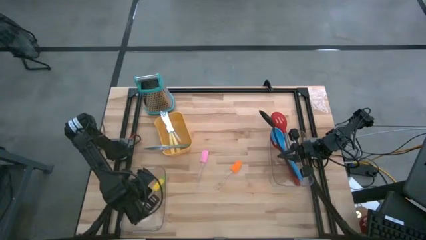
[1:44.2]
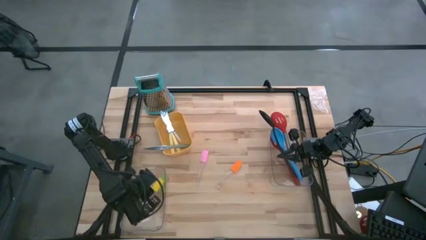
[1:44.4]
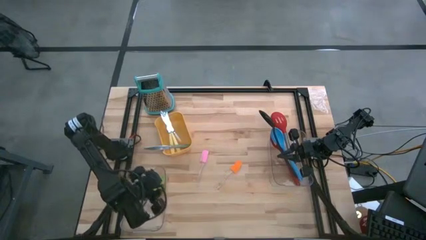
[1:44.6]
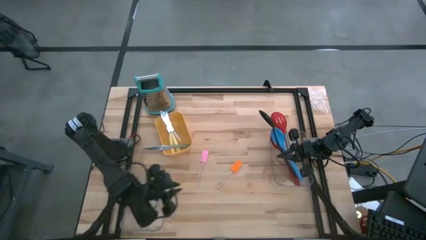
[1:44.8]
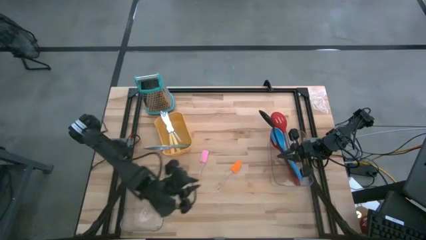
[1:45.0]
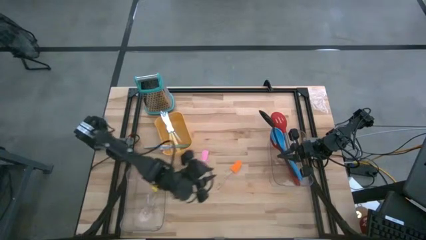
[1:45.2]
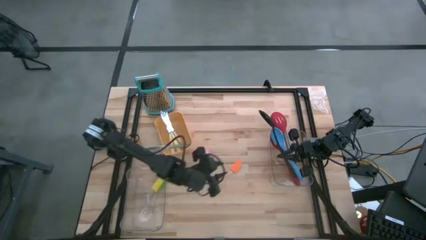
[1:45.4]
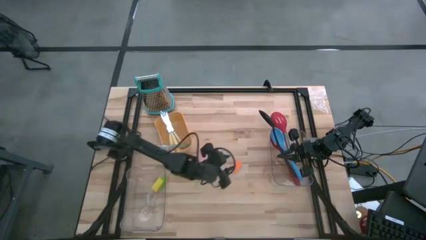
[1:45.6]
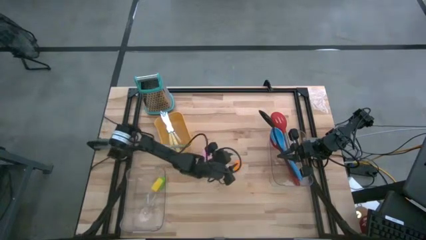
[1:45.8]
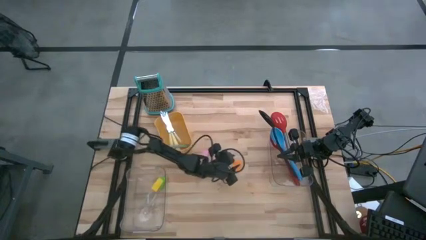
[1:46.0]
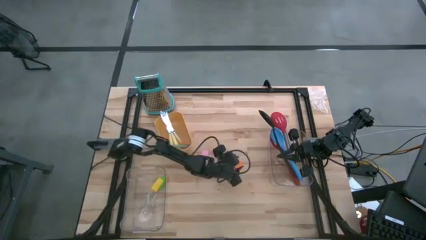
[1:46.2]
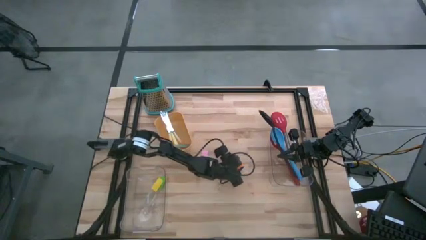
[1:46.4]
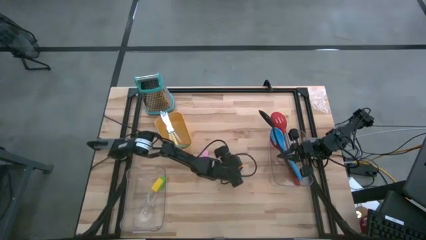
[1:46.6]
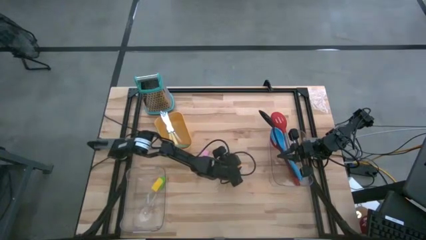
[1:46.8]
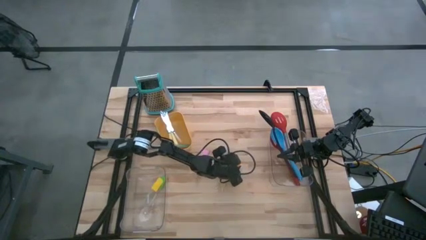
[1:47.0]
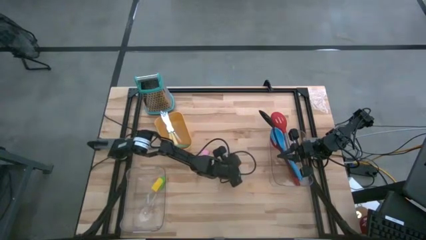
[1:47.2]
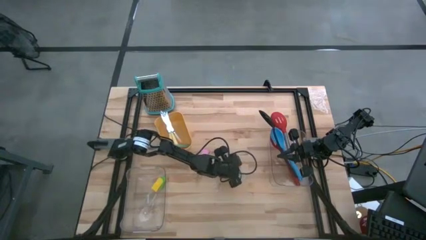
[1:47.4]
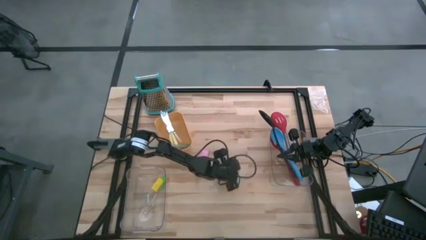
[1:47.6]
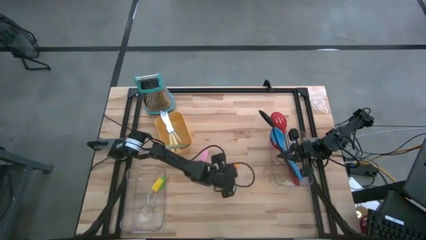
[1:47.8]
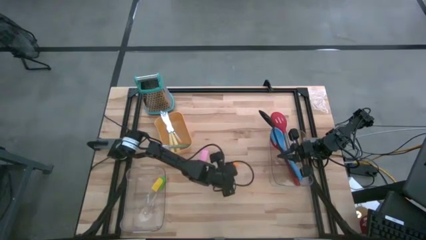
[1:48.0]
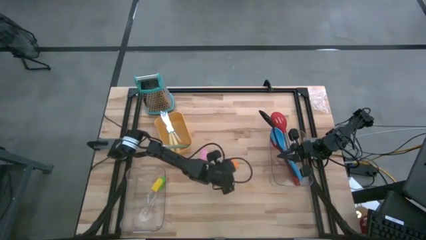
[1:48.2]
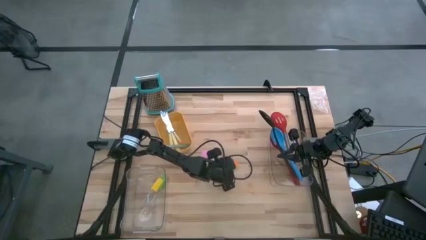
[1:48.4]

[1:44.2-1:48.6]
Task: Pick & Place Kitchen Items
Put the orange spatula into the left transparent bin

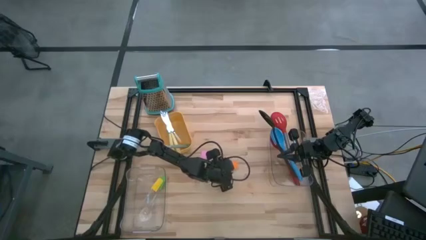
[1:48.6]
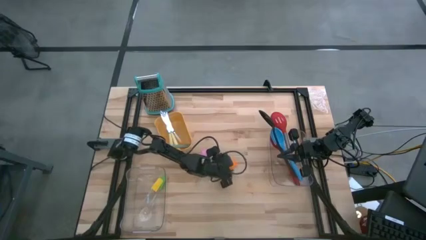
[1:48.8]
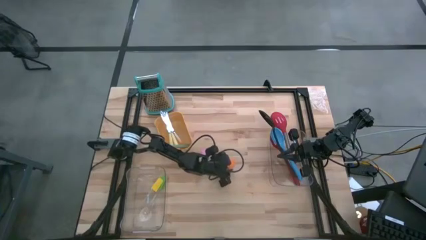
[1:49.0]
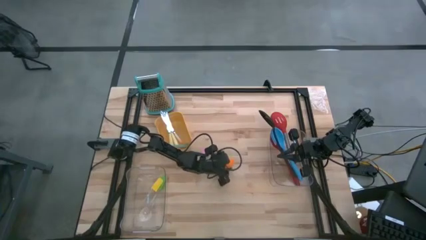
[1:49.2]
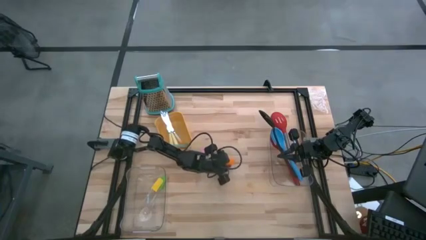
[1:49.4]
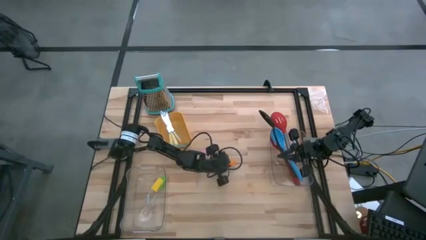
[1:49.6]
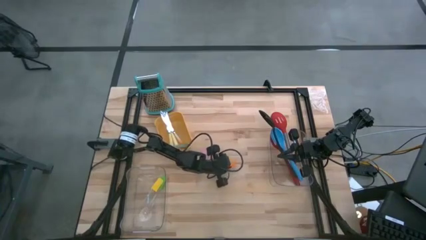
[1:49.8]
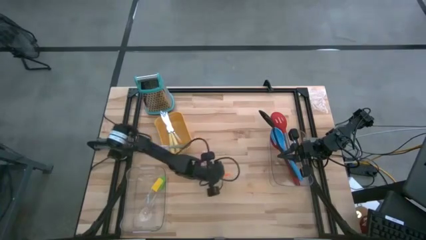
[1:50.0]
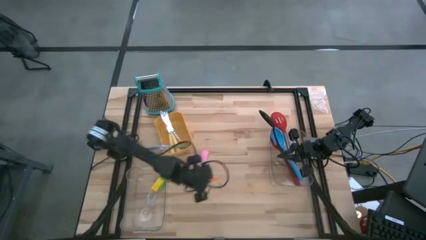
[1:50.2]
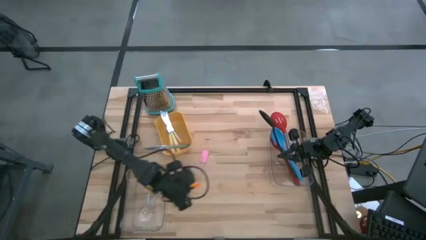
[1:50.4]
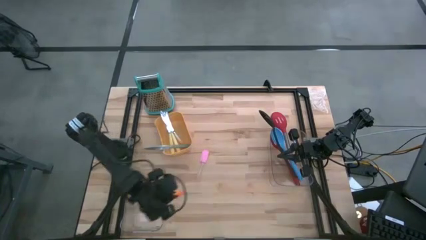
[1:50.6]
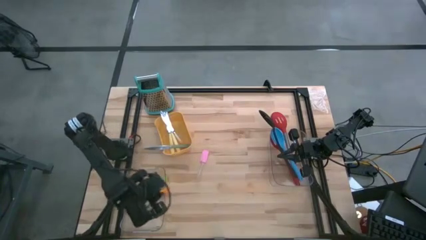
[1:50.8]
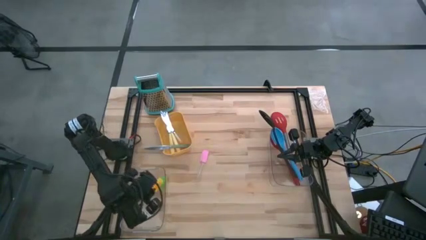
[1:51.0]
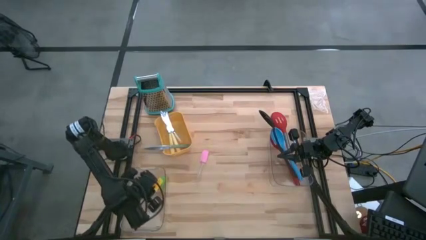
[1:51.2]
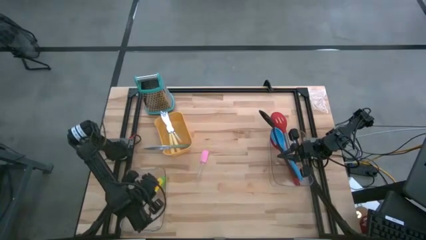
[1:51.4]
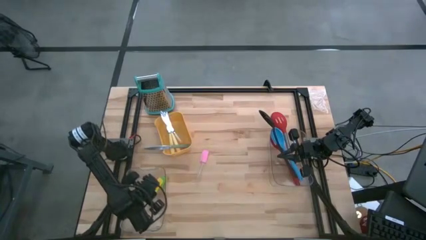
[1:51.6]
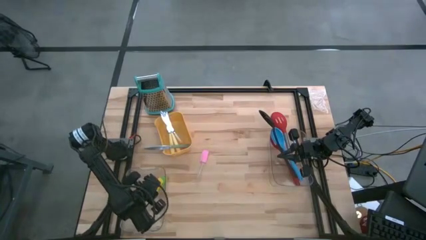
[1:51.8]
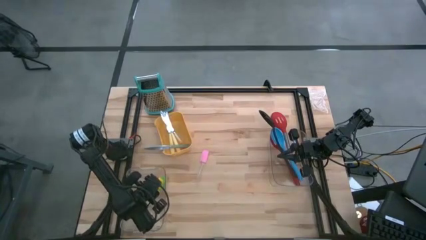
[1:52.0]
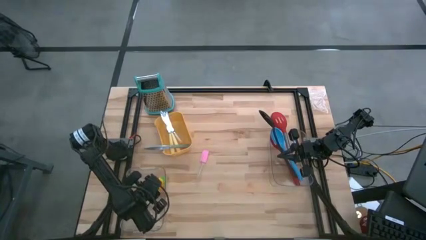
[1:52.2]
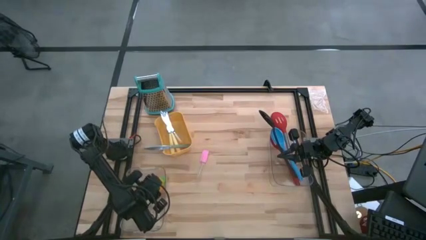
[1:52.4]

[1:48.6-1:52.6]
Put the orange spatula into the left transparent bin

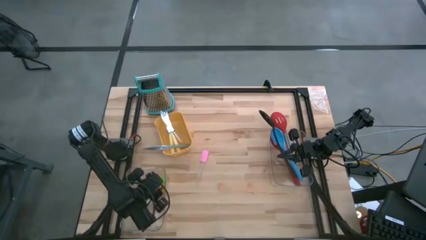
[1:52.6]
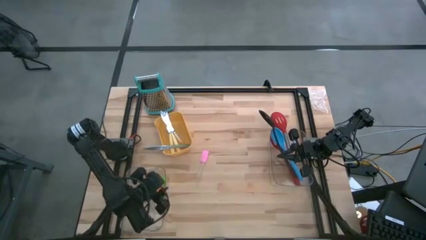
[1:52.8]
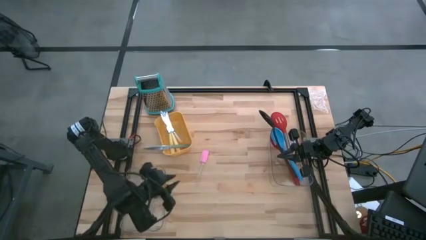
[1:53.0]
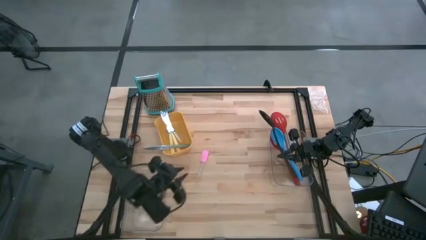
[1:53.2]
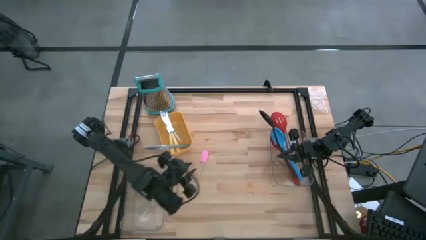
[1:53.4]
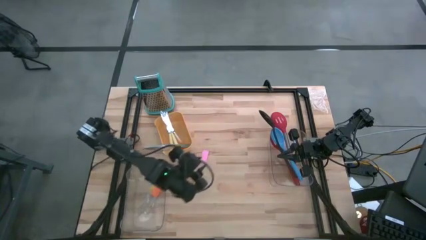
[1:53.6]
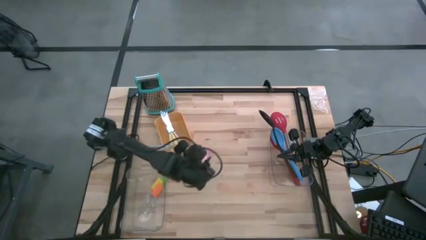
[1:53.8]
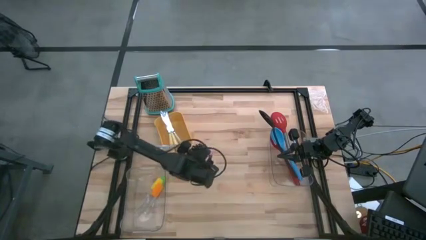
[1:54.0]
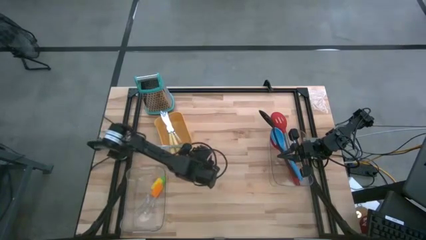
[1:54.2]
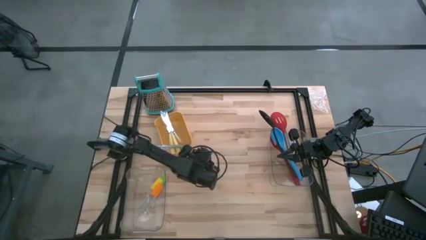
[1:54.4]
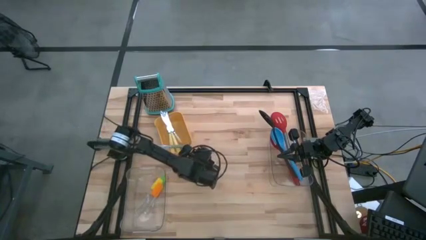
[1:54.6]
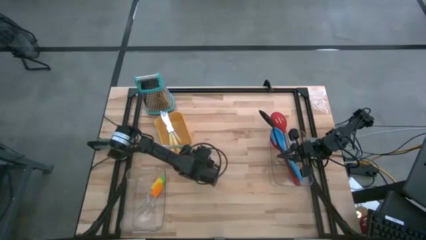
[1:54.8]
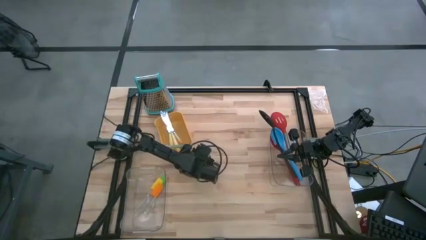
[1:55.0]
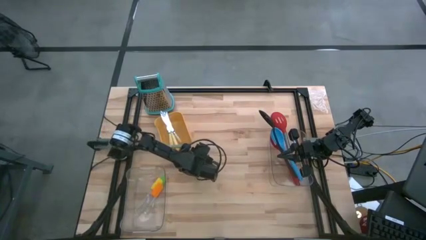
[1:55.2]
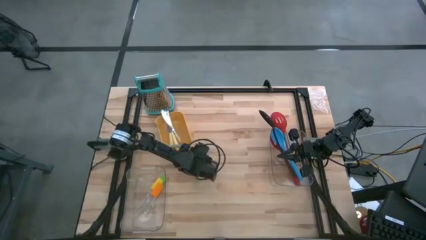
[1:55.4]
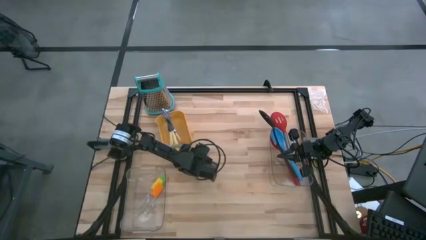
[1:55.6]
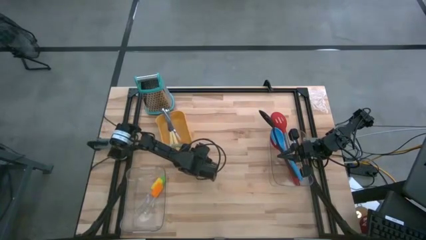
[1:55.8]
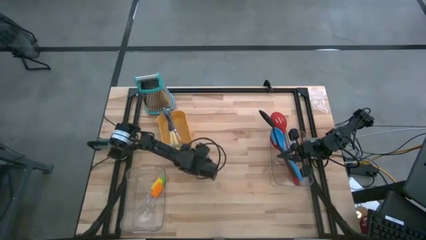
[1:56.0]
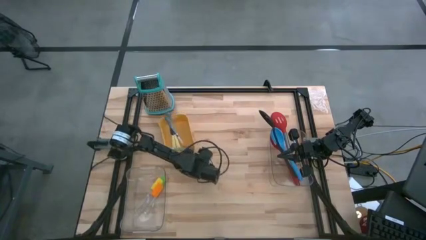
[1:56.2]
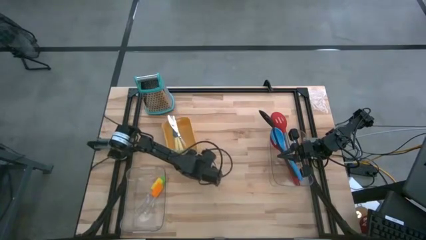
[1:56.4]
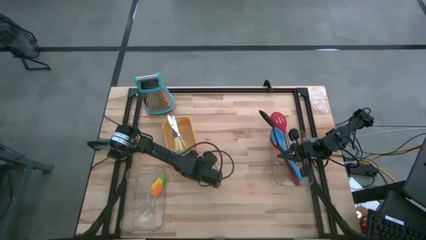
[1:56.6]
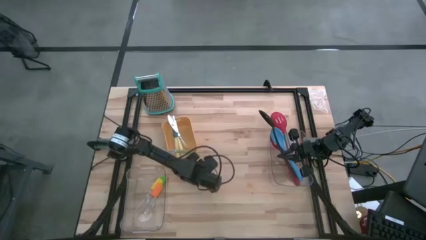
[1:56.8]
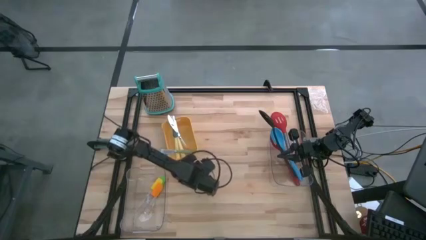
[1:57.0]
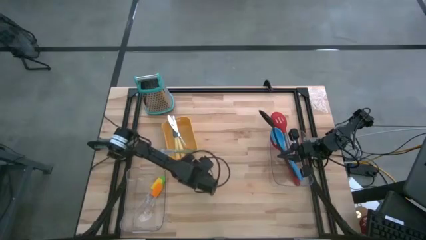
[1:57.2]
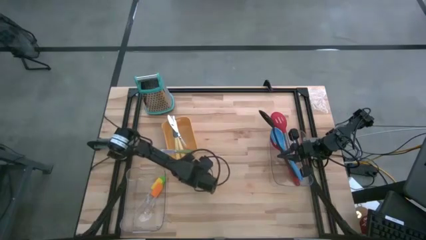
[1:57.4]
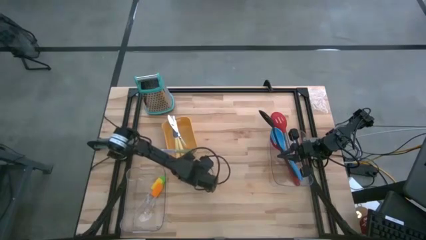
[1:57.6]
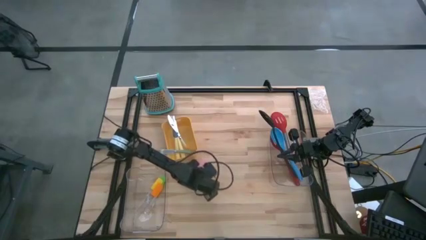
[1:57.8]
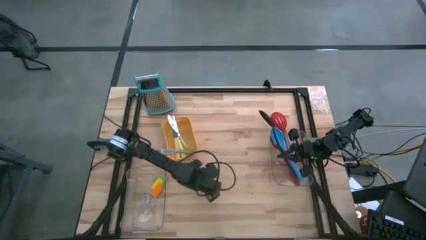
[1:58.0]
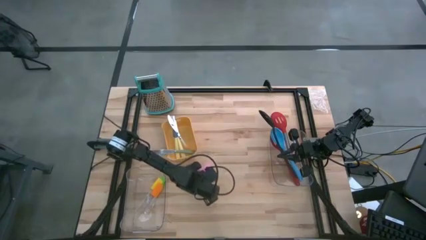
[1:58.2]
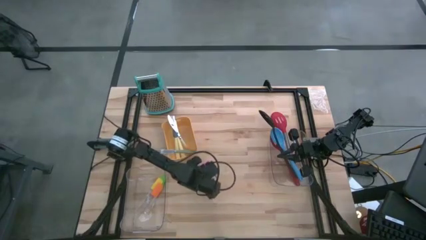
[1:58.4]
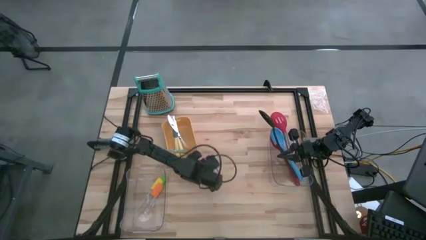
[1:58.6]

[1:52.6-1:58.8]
Put the pink spatula into the left transparent bin

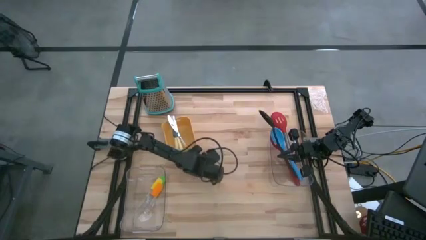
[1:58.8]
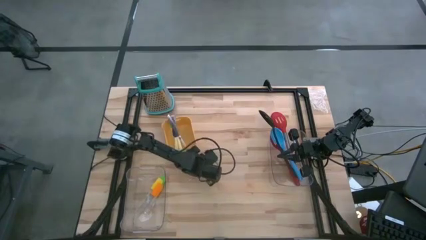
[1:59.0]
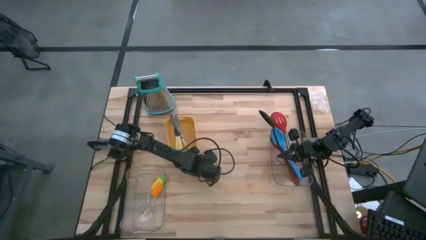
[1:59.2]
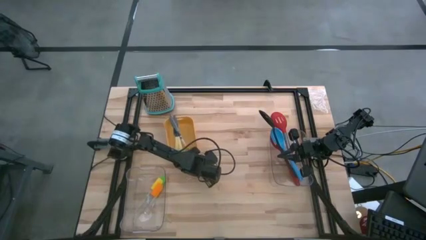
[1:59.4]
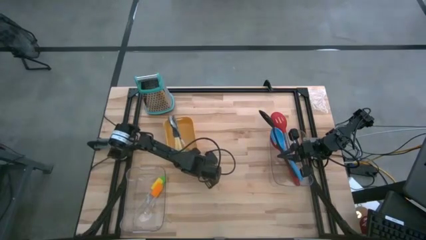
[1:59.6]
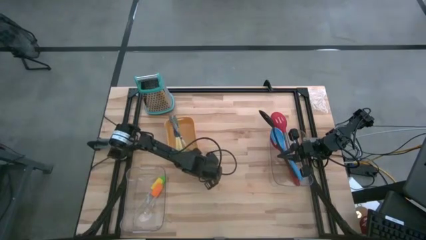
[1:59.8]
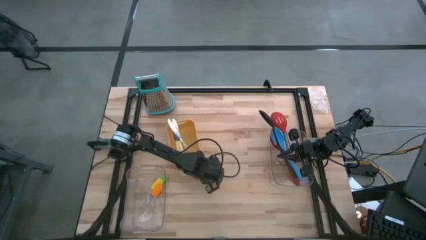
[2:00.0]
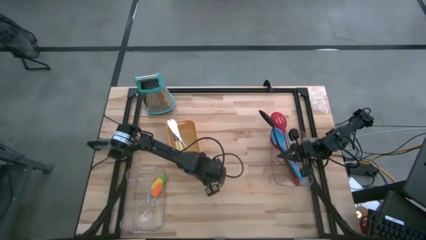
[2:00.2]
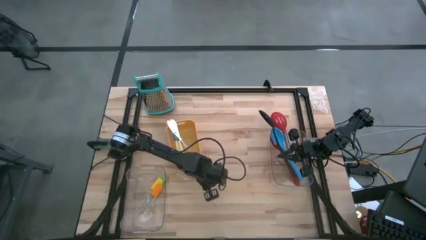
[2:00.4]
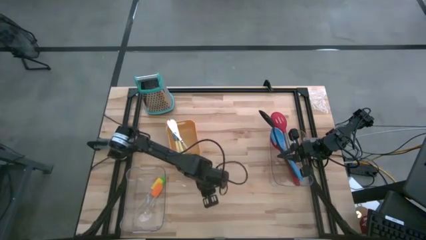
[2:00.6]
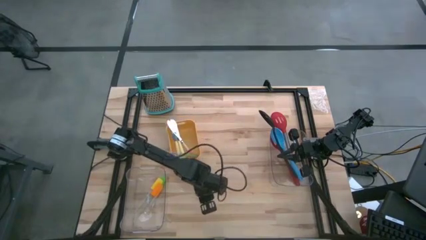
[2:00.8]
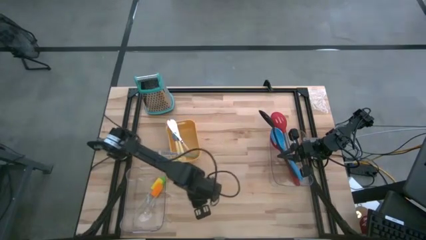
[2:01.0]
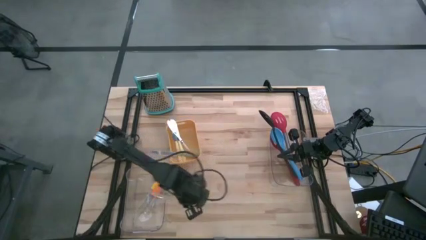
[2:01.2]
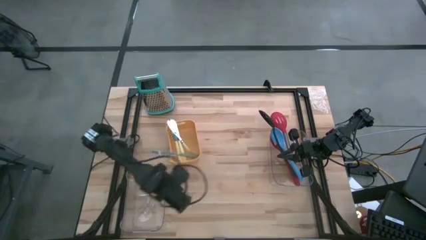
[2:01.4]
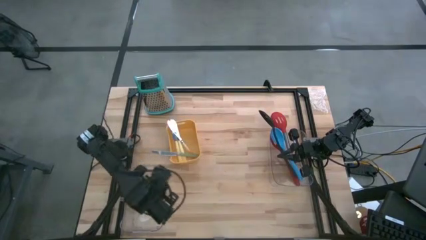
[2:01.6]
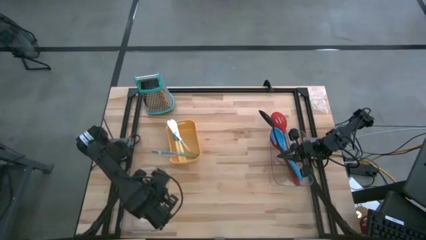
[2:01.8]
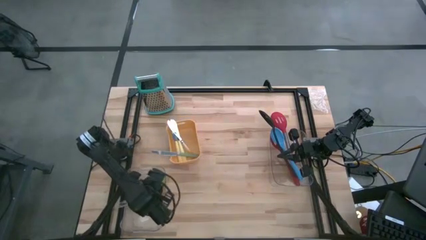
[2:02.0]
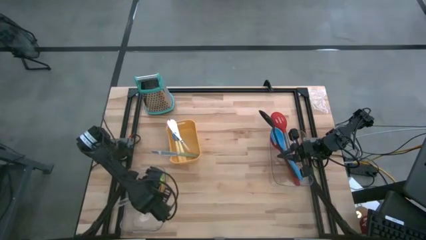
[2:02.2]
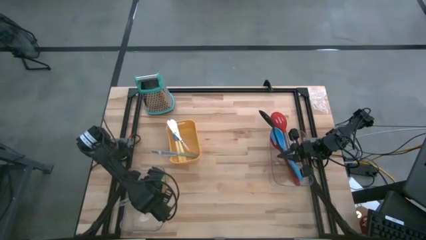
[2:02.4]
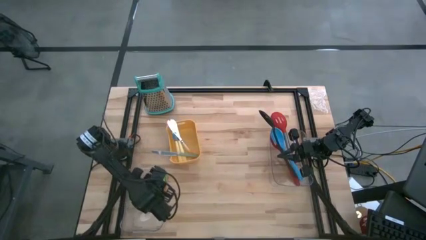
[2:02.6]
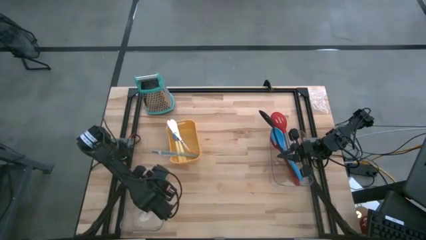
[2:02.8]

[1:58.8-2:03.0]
Put the pink spatula into the left transparent bin
